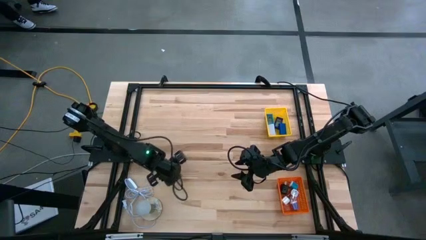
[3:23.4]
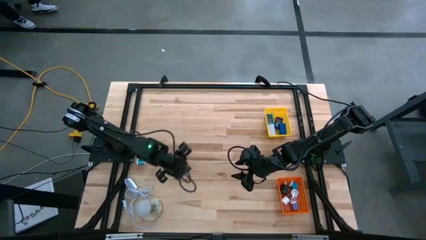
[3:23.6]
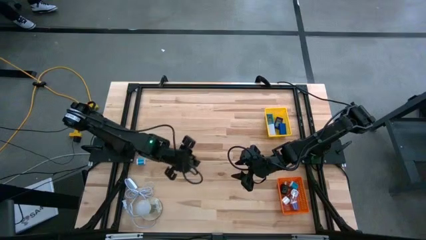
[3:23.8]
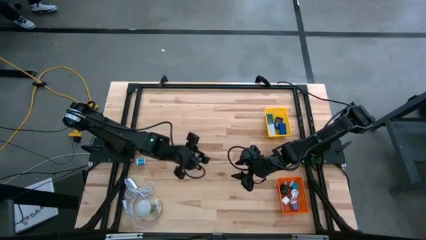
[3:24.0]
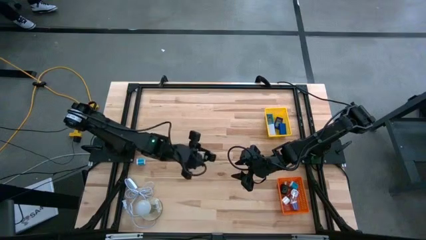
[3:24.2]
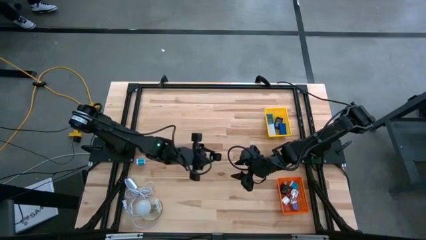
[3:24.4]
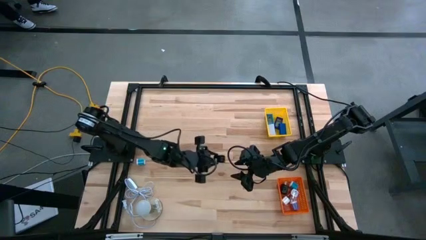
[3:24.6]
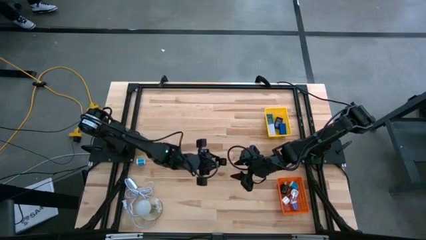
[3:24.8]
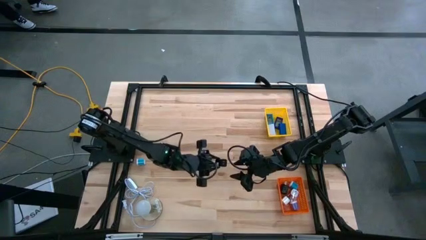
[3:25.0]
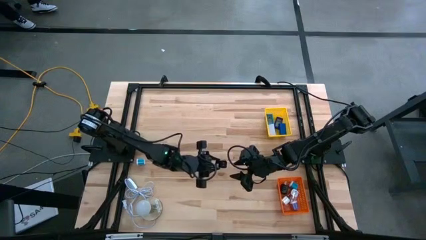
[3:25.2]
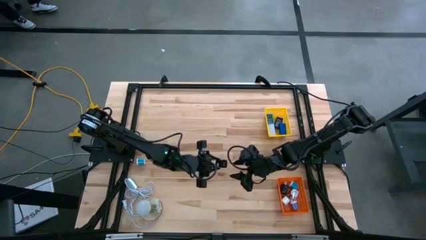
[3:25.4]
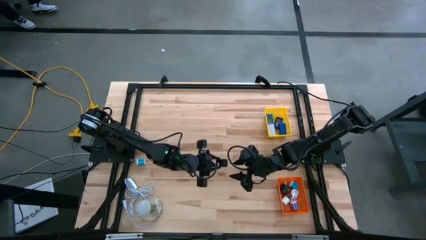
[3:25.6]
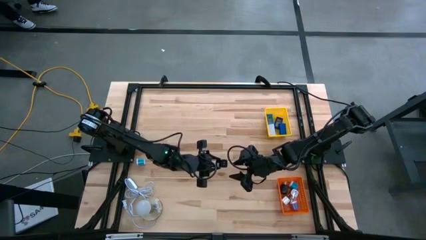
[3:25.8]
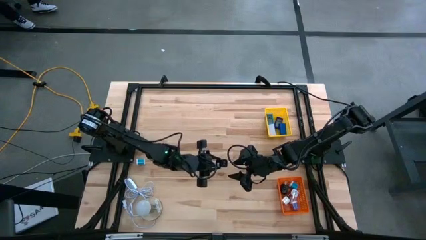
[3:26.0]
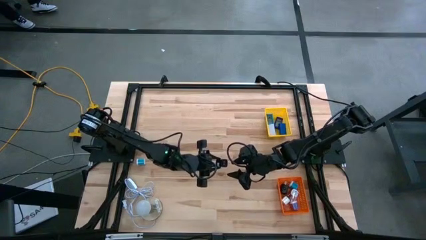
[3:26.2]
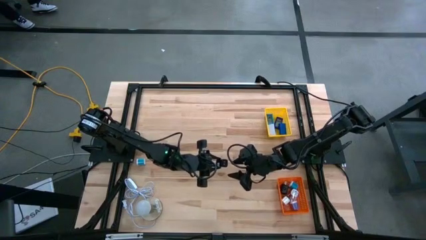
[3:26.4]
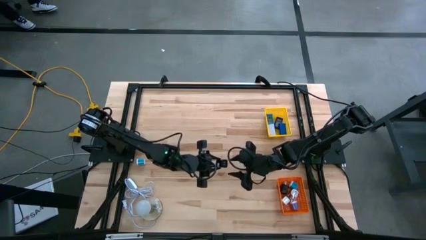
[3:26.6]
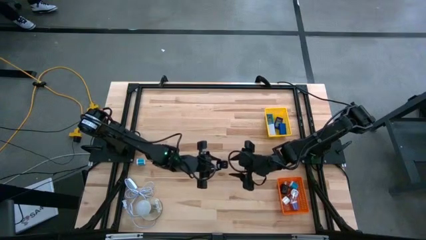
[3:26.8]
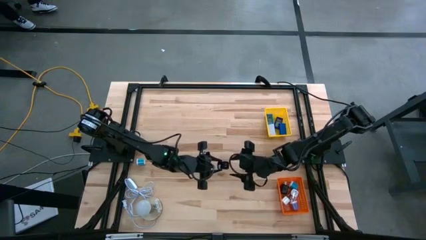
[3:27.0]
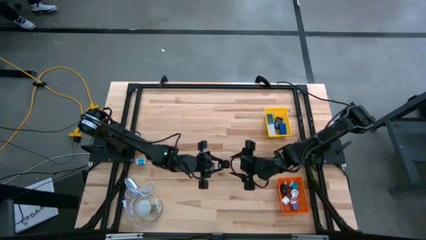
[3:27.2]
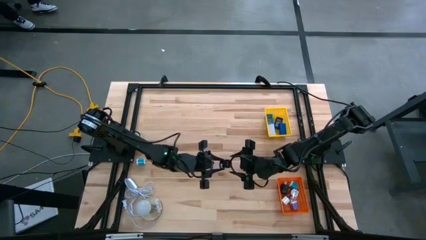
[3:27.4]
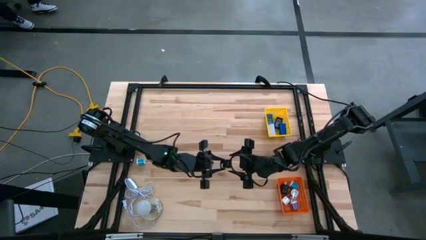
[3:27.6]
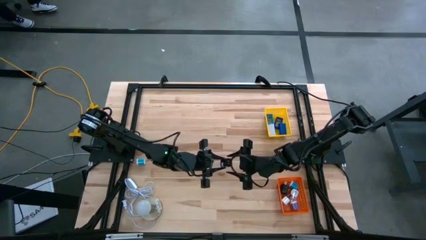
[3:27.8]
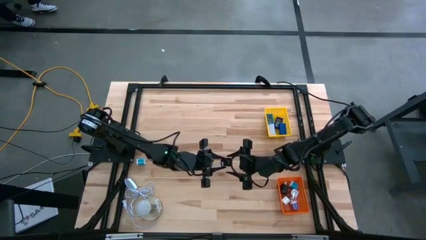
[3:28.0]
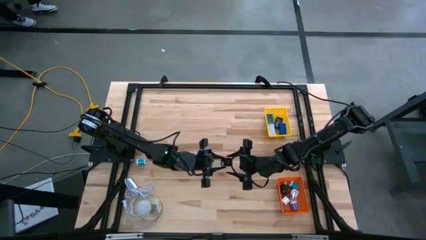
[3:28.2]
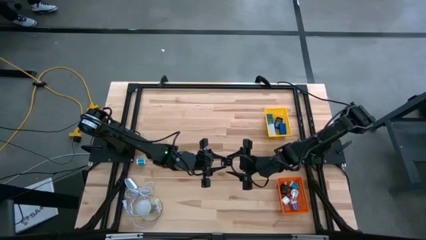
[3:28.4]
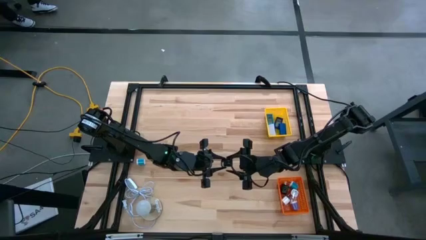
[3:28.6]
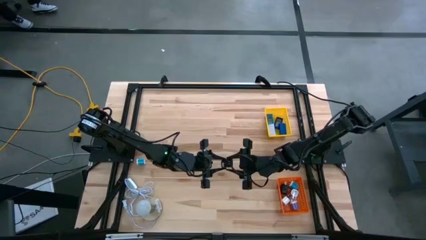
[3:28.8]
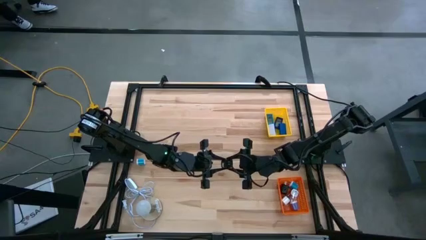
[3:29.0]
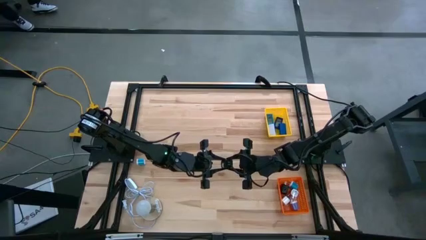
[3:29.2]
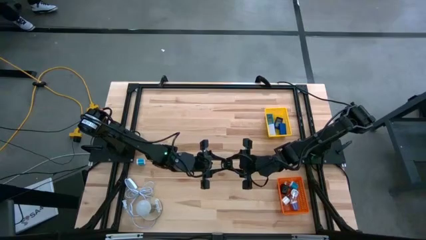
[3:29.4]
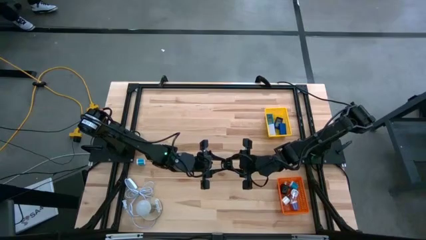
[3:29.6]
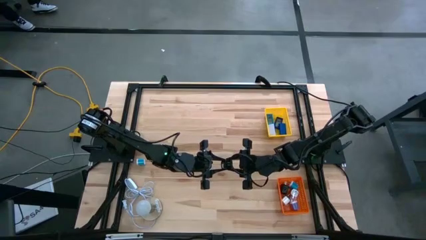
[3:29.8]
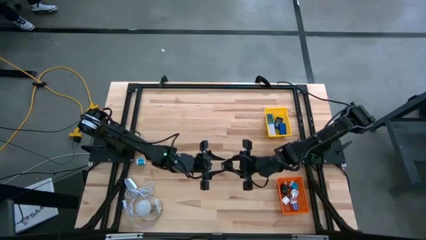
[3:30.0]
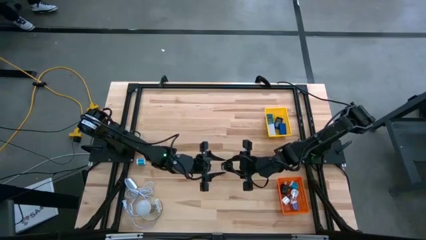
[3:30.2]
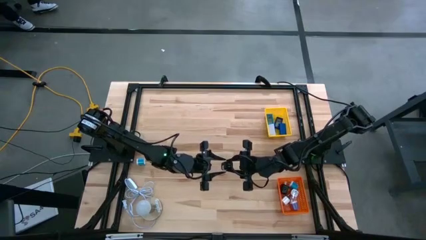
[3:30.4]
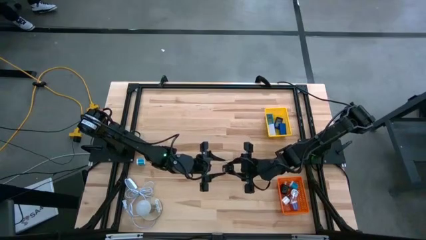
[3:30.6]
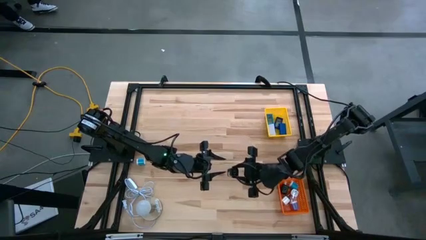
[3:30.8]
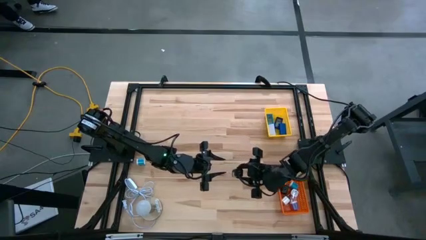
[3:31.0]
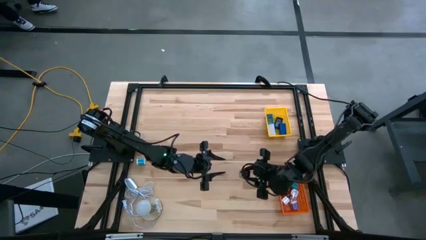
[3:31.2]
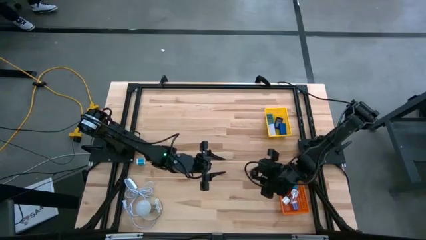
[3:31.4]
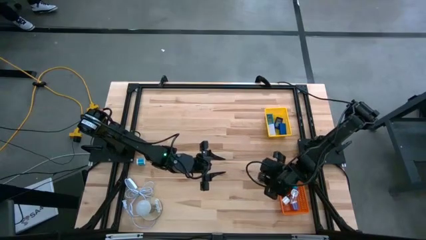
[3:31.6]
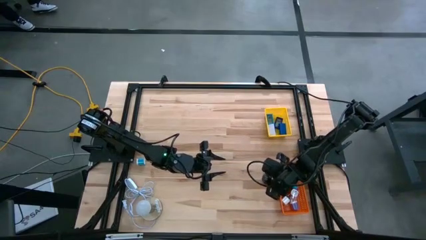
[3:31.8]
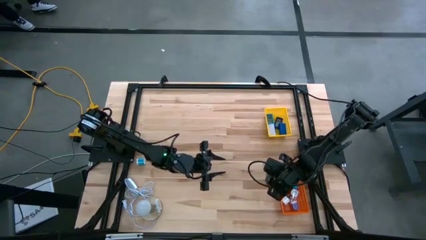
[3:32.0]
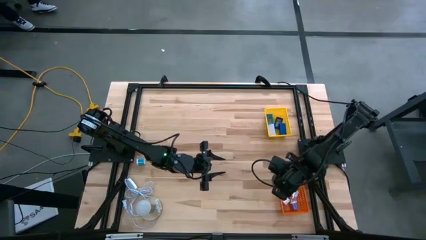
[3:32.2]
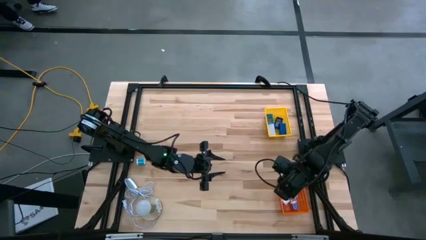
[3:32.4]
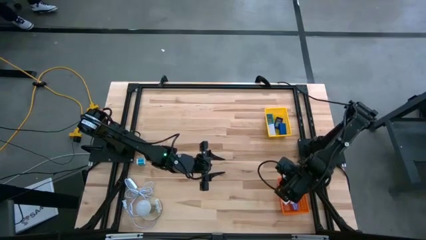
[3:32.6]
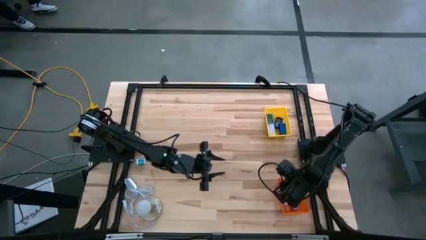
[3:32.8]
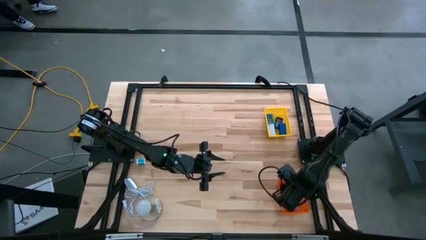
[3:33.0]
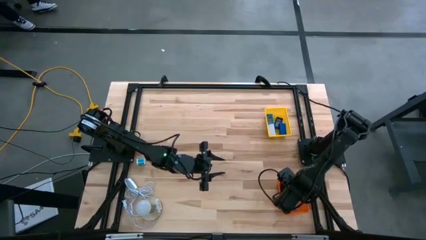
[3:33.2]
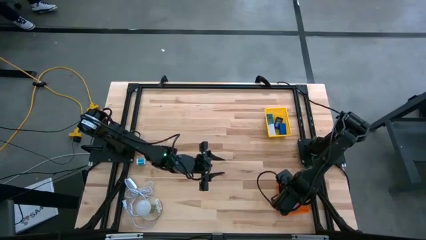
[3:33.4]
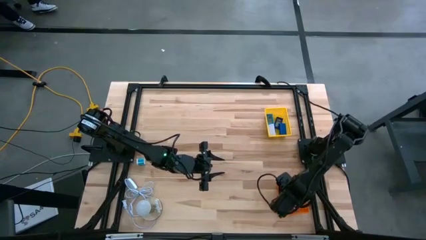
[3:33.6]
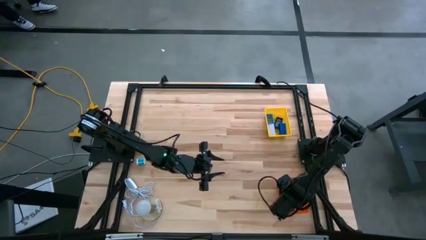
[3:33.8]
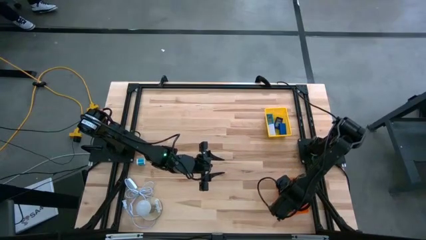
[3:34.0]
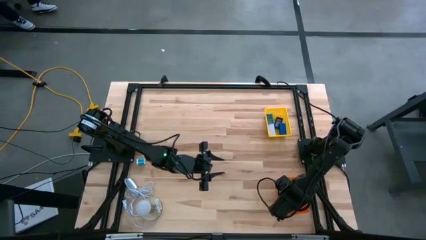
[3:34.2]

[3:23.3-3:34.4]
Task: Pick & Place Office items
Put the black charger adapter into the orange bin

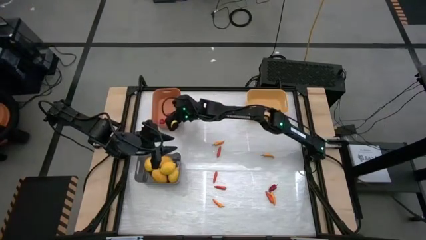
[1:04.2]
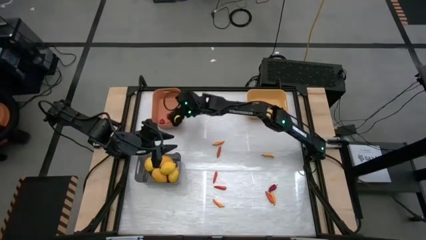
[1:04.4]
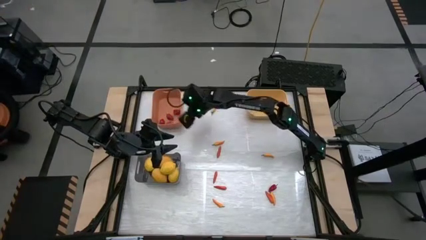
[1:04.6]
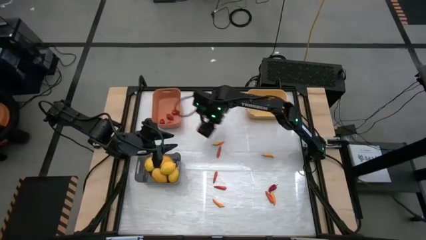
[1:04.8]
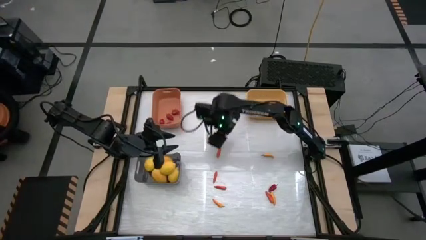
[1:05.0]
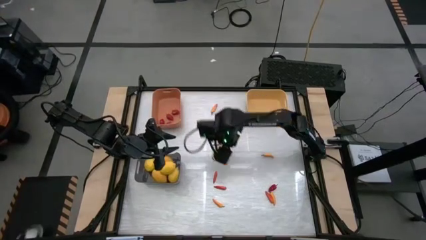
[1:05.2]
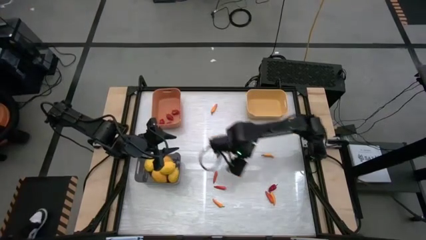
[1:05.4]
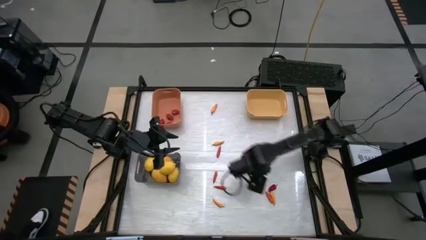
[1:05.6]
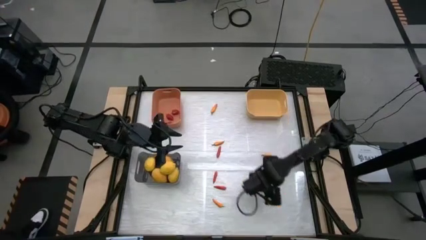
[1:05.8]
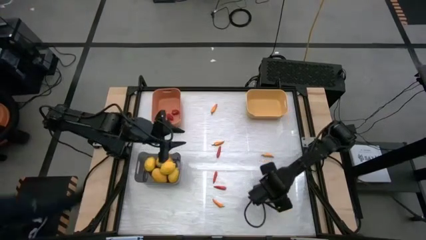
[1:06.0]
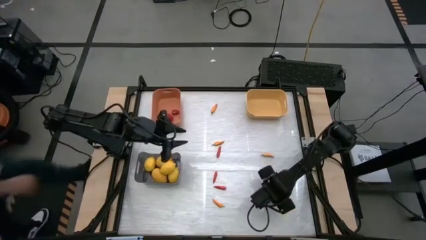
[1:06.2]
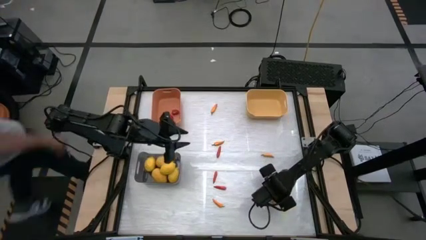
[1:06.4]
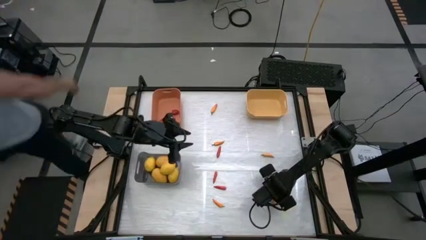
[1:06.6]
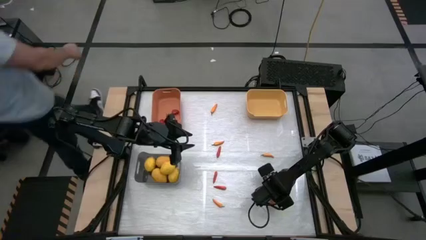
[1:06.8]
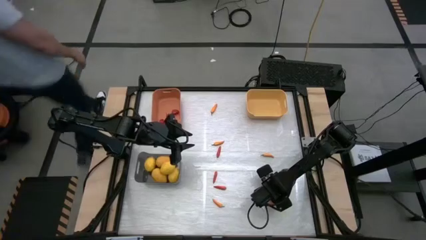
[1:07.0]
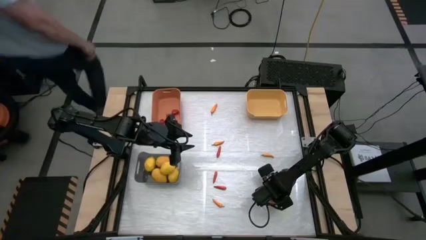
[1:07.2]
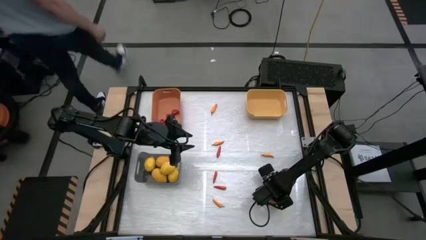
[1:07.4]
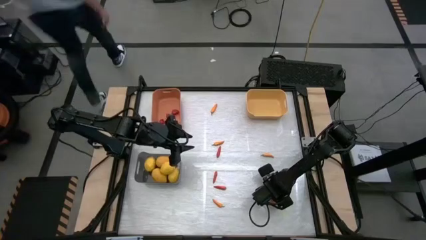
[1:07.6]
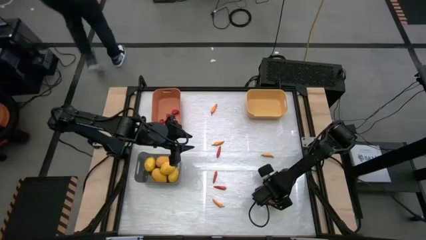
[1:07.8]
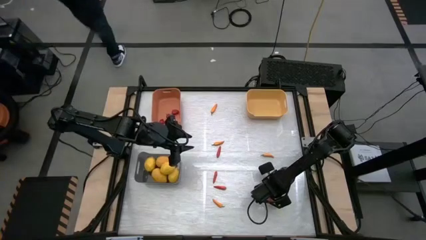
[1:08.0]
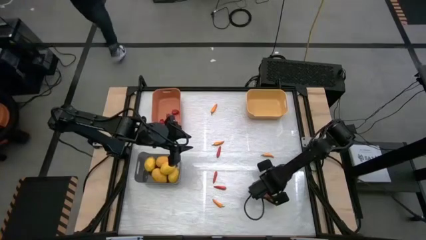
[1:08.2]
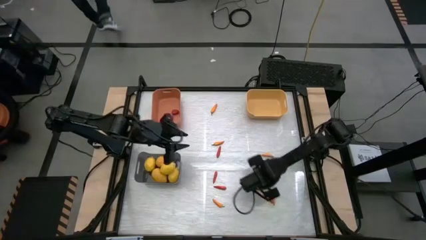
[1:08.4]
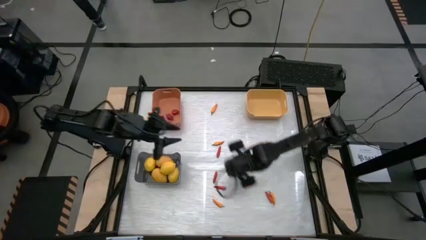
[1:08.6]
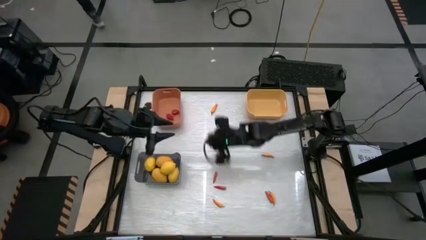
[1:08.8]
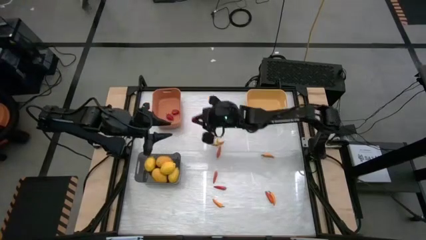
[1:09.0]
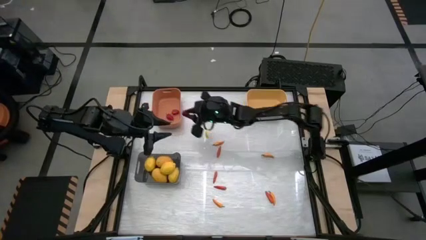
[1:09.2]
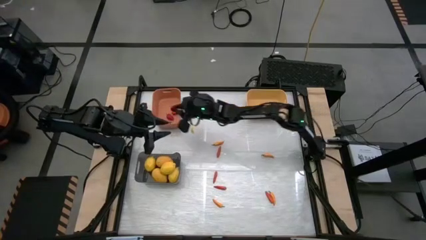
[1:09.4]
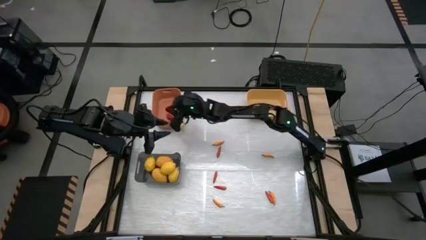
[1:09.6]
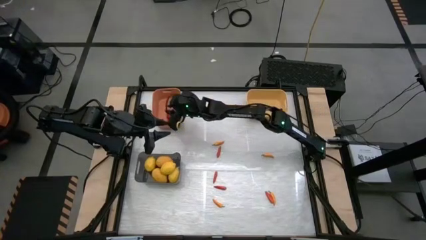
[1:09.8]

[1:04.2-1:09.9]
Task: Sort produce into baskets
Put the red bell pepper into the orange bin
